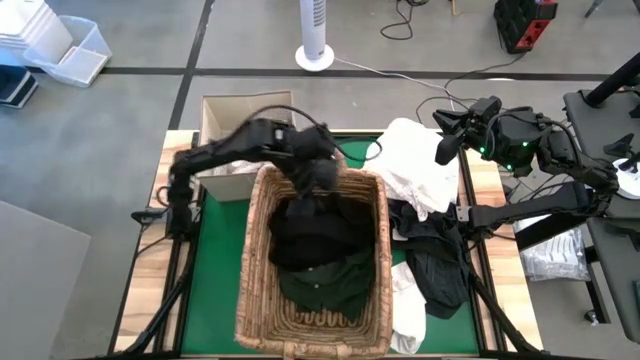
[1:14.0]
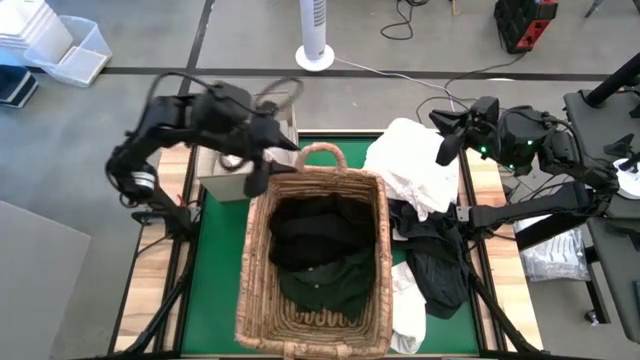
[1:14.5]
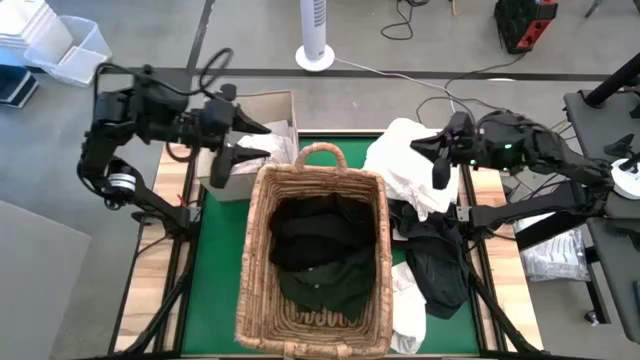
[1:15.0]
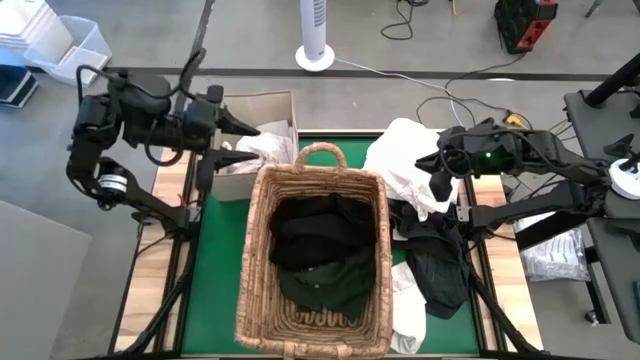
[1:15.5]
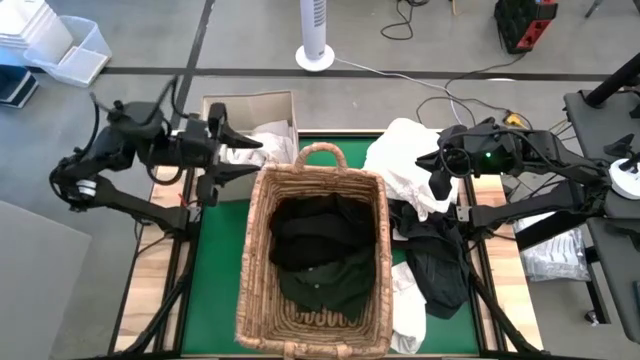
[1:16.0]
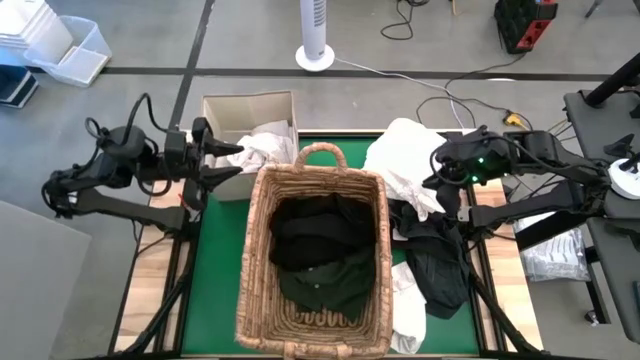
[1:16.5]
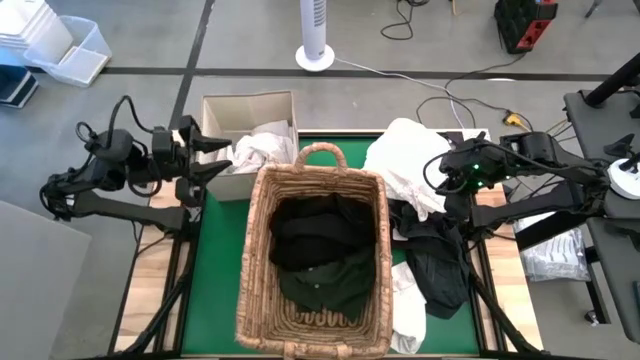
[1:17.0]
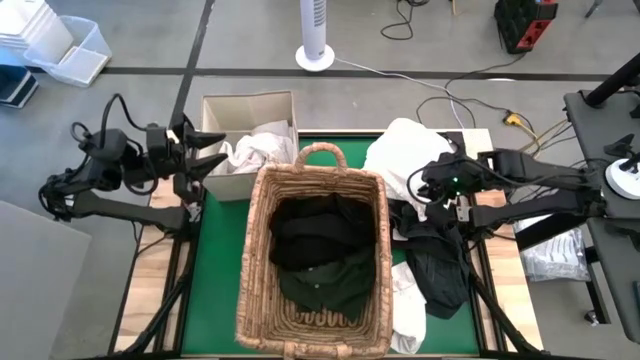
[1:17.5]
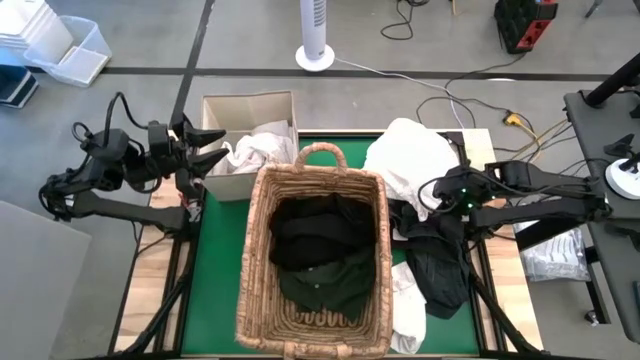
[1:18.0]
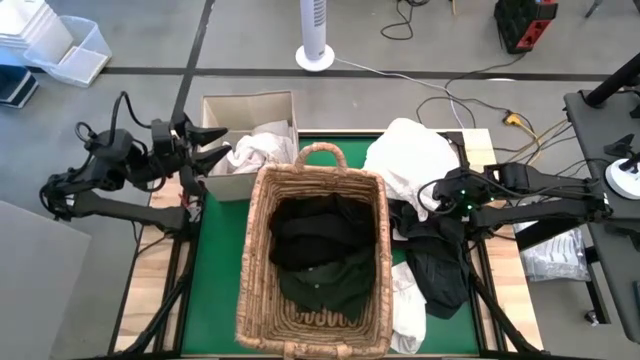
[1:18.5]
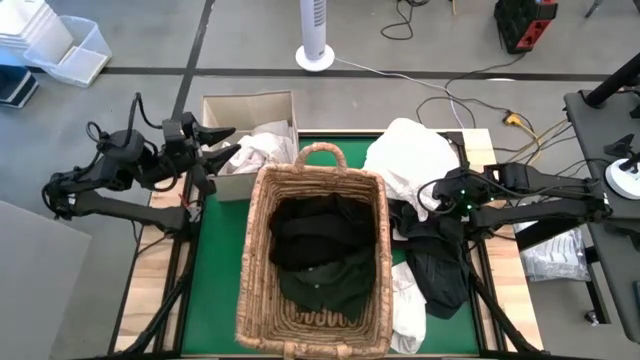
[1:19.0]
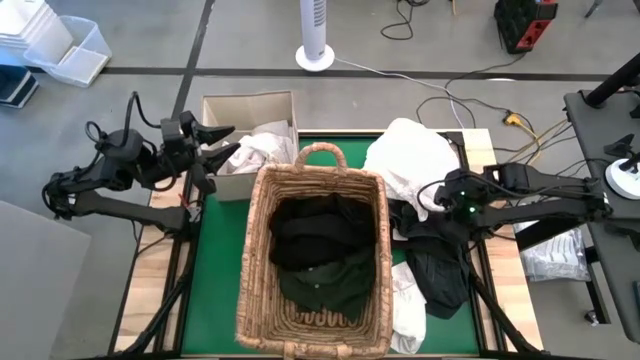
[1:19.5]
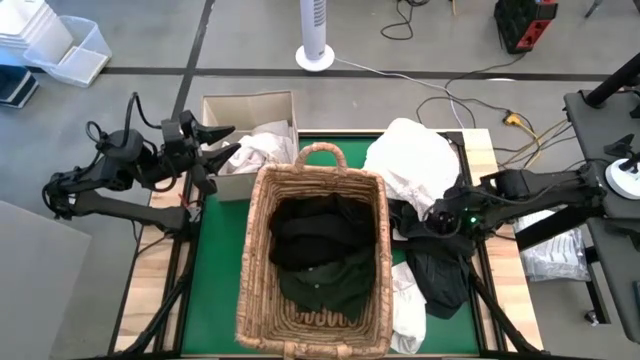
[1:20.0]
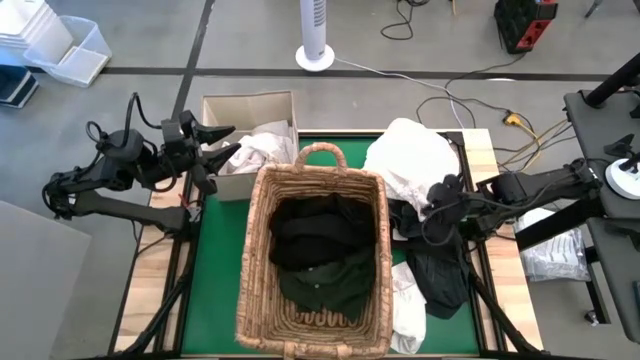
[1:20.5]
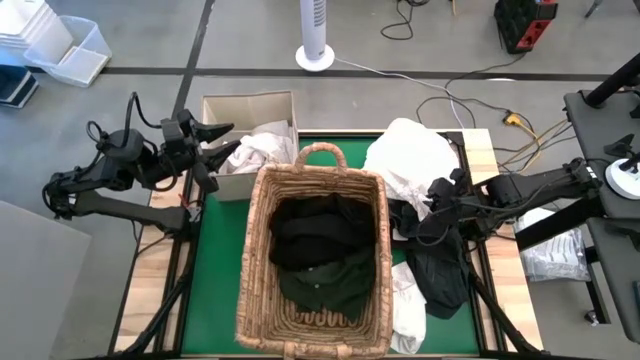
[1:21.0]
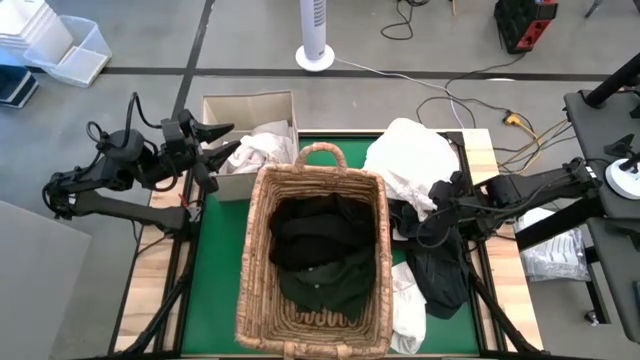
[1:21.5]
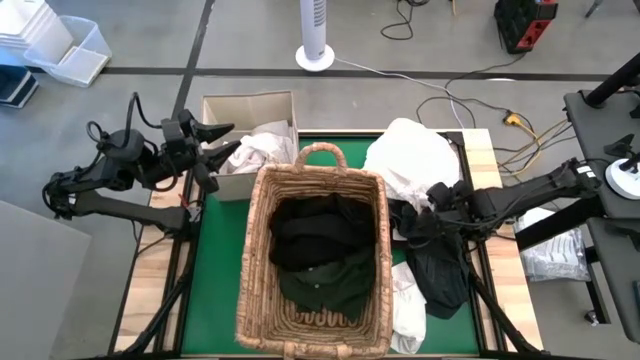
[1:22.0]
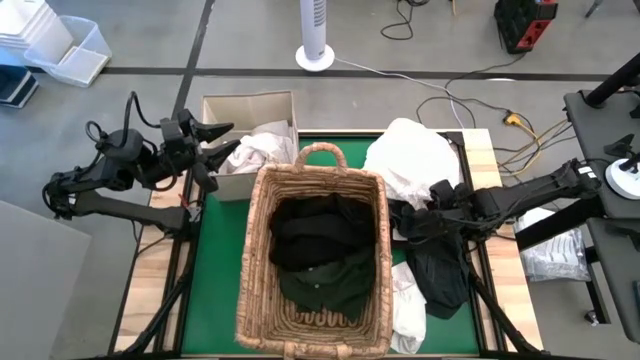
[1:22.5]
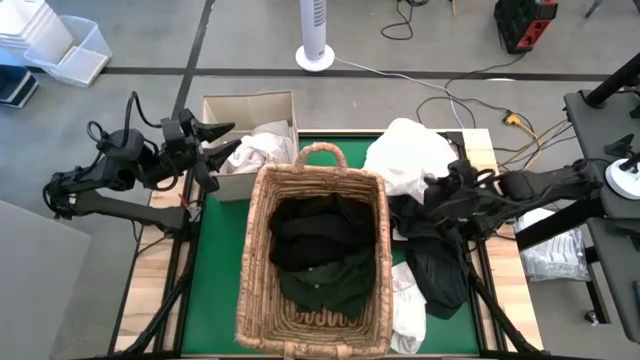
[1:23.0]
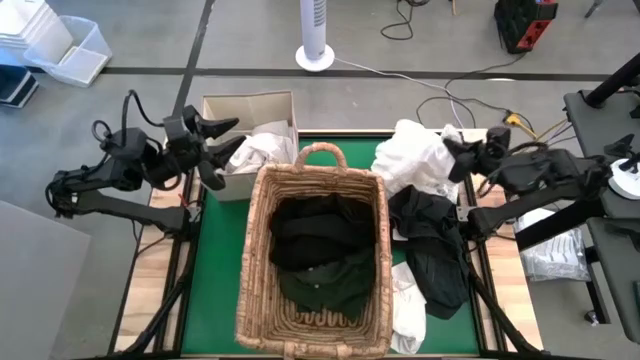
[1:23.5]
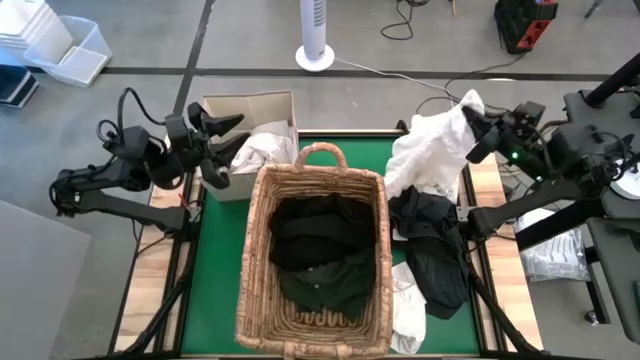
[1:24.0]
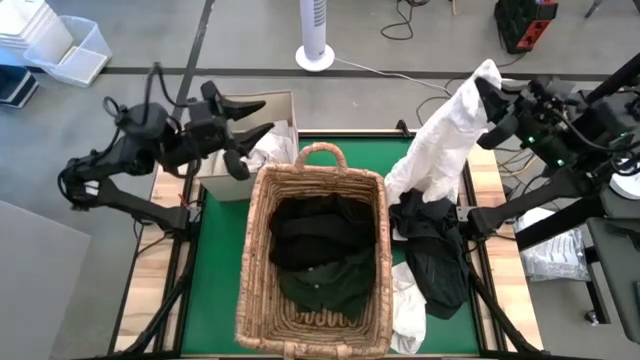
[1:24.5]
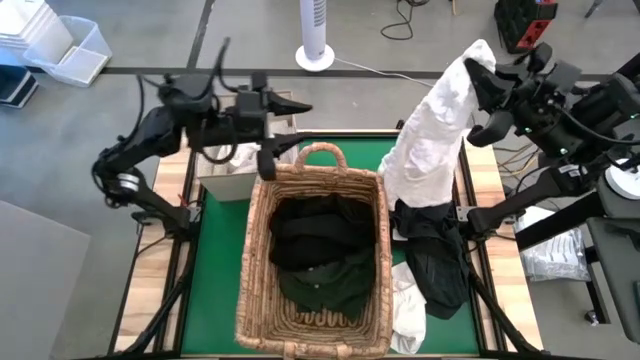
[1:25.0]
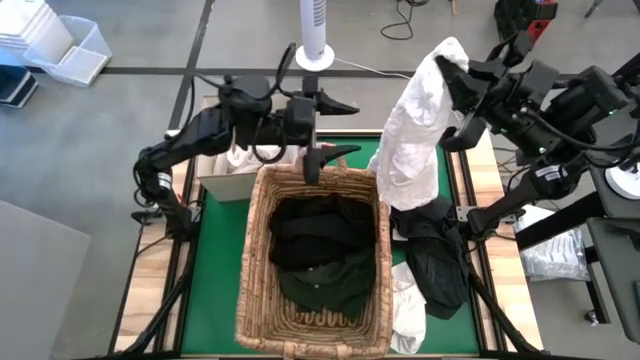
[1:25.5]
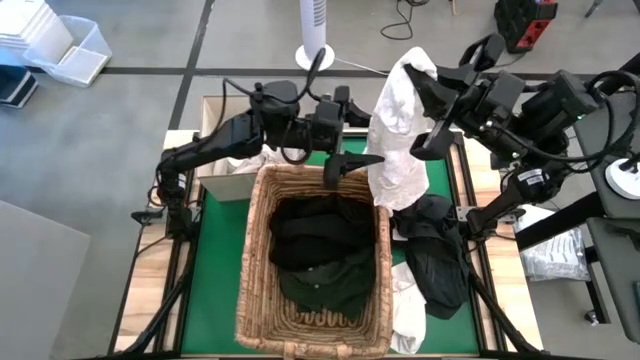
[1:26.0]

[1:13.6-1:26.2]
Put the white shirt into the gray laundry organizer

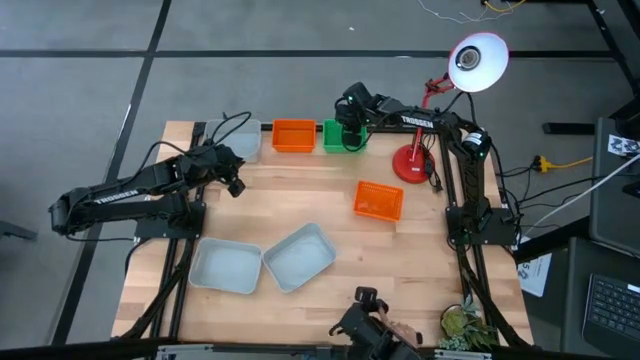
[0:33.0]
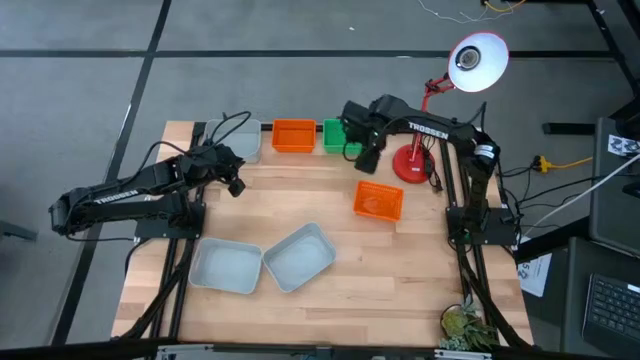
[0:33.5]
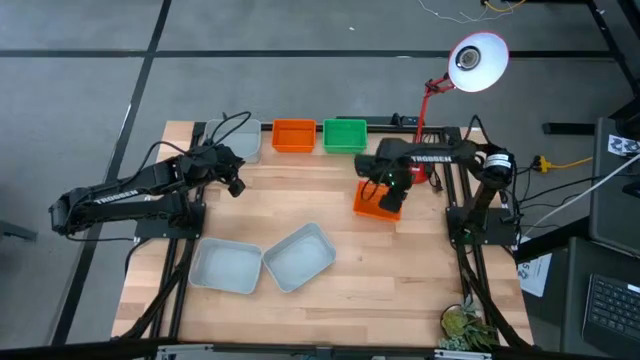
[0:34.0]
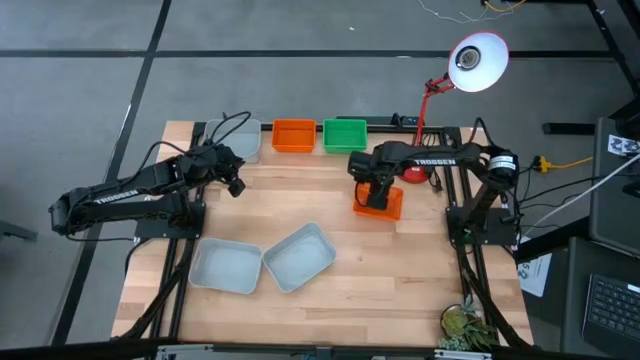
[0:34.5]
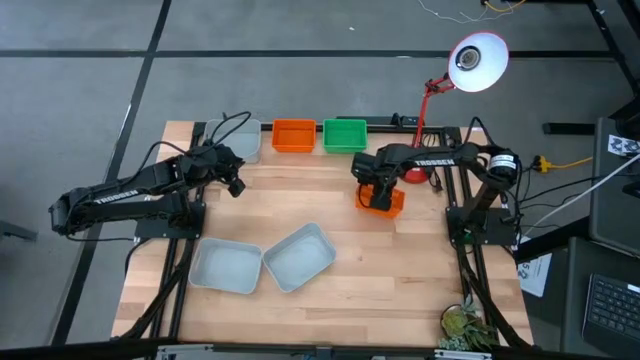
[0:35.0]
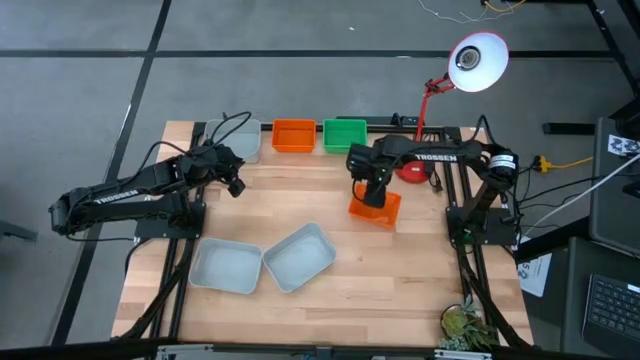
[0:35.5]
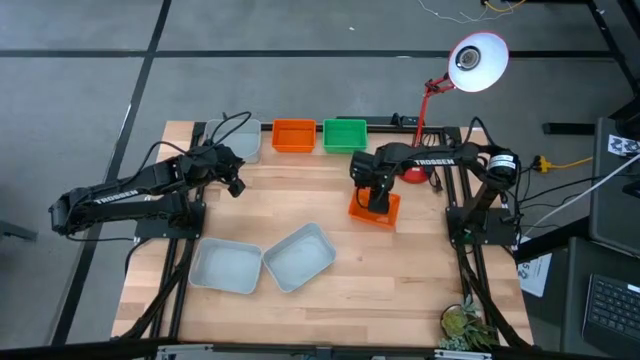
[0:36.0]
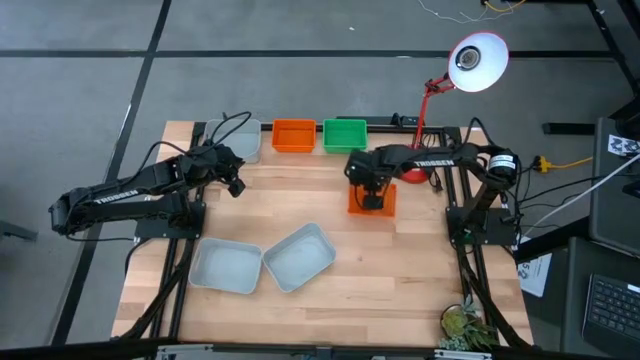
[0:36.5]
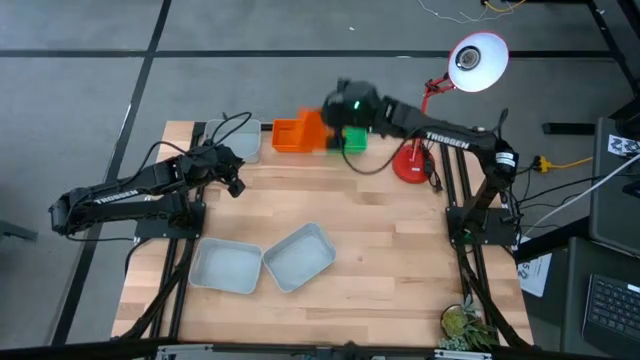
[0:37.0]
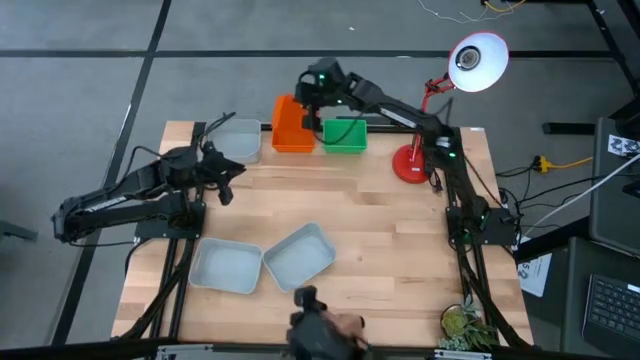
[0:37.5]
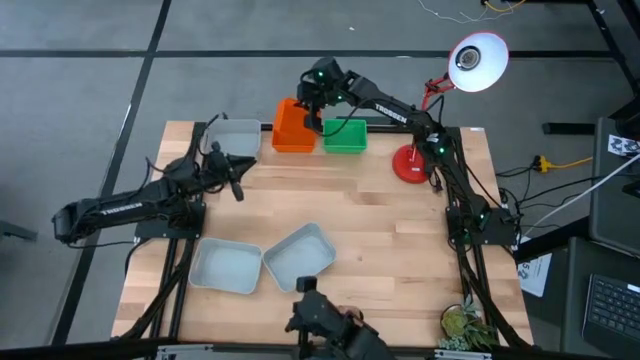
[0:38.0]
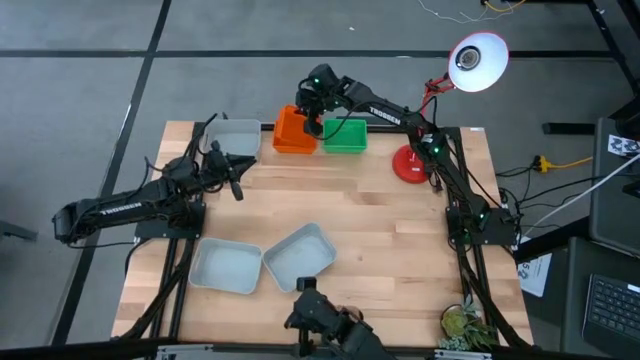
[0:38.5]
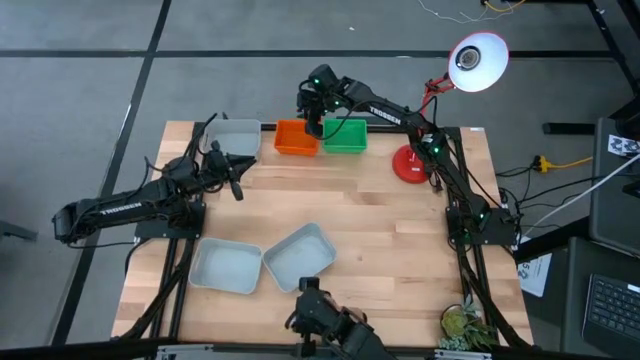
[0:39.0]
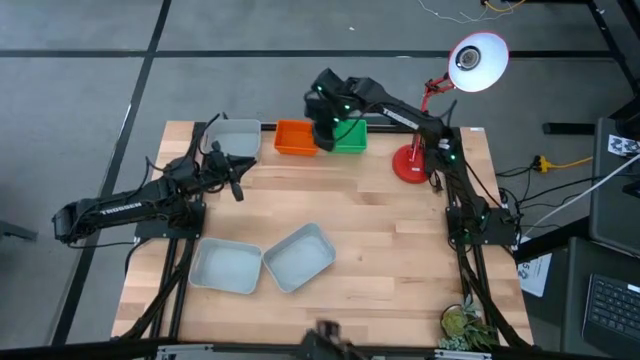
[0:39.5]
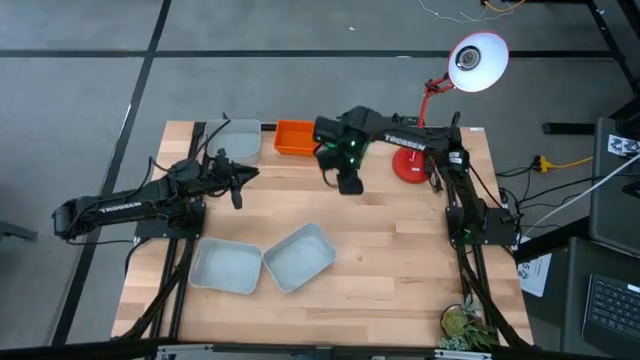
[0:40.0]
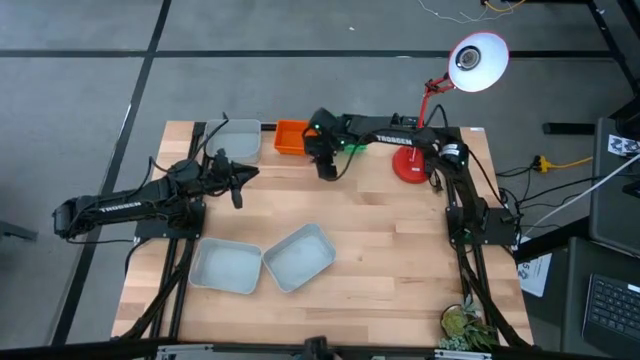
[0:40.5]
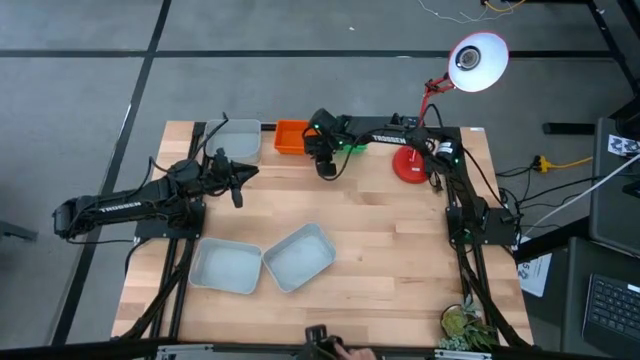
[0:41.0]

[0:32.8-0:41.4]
Stack the orange bin on the top orange bin
